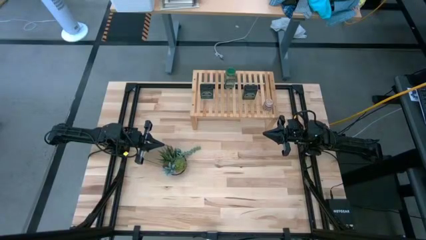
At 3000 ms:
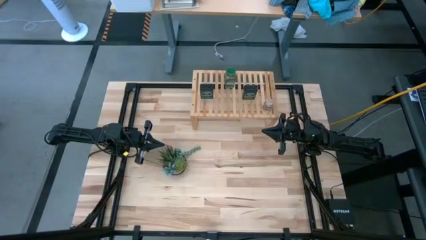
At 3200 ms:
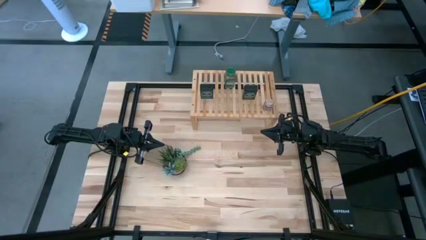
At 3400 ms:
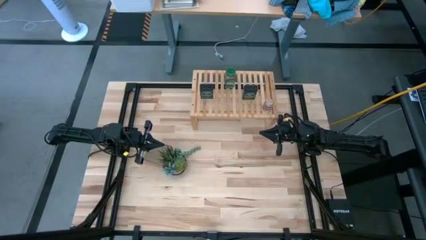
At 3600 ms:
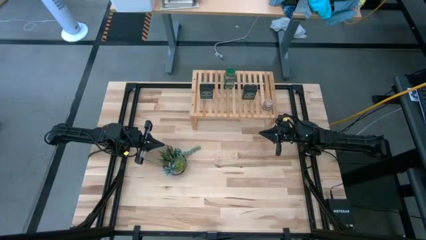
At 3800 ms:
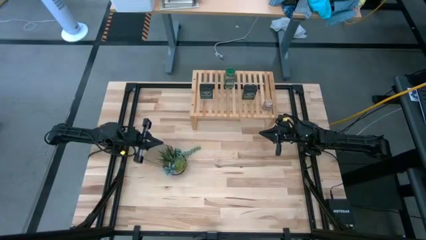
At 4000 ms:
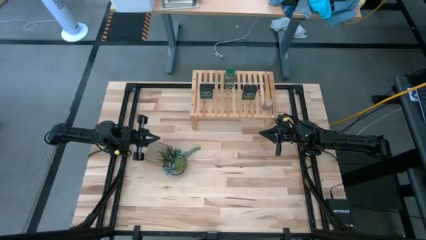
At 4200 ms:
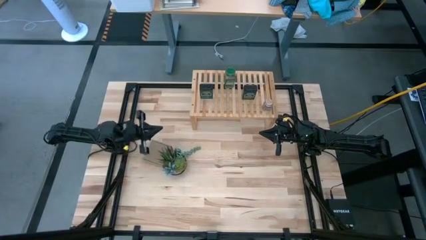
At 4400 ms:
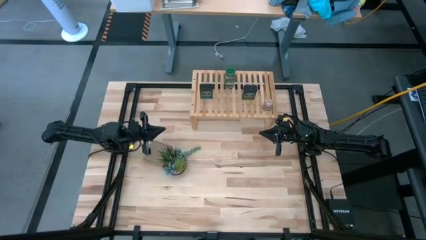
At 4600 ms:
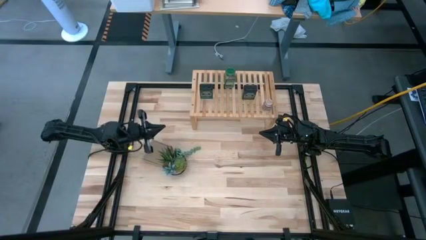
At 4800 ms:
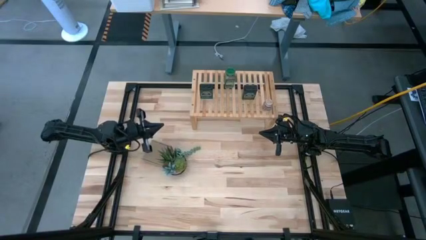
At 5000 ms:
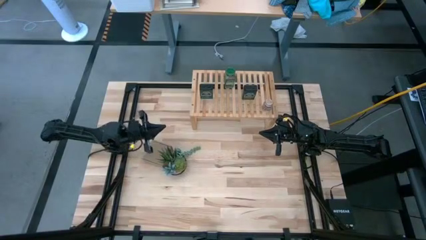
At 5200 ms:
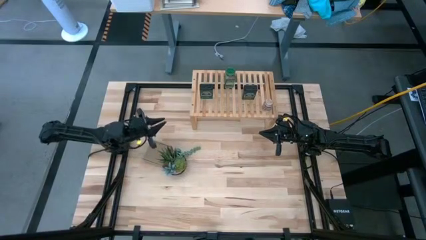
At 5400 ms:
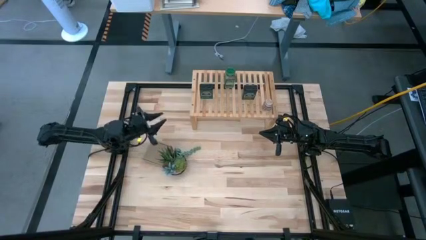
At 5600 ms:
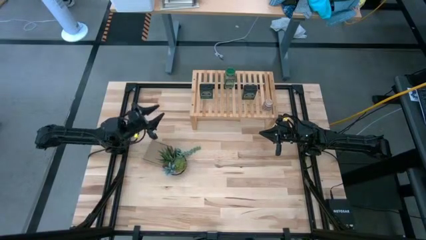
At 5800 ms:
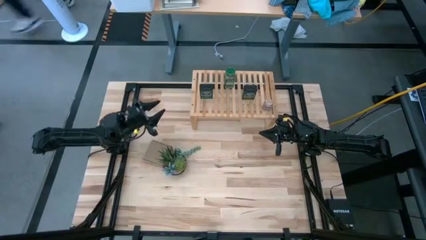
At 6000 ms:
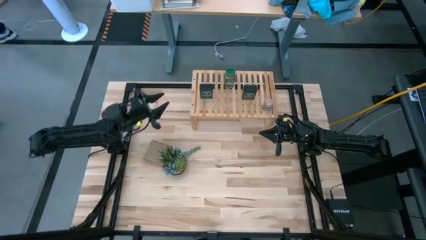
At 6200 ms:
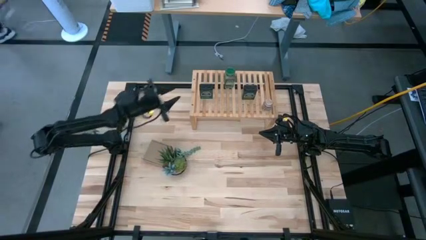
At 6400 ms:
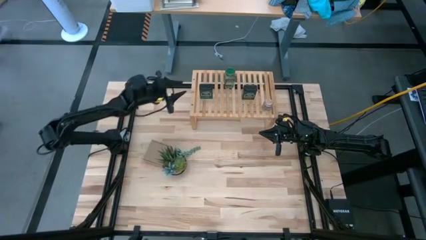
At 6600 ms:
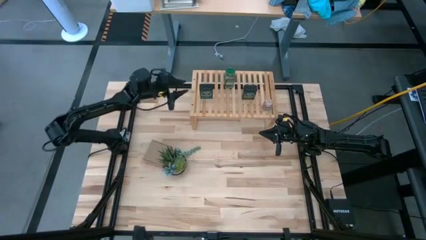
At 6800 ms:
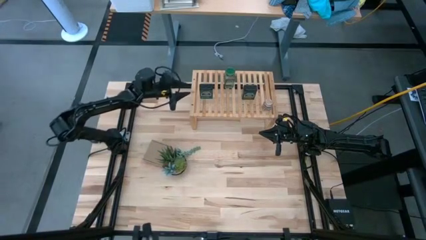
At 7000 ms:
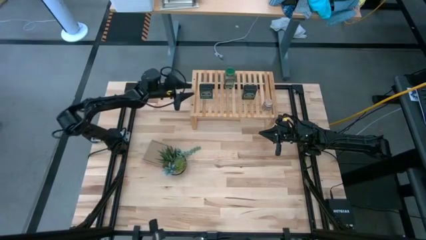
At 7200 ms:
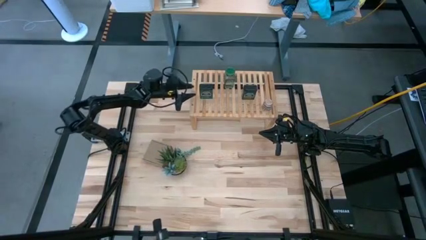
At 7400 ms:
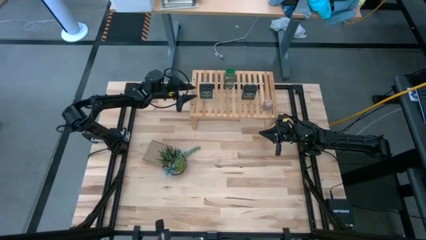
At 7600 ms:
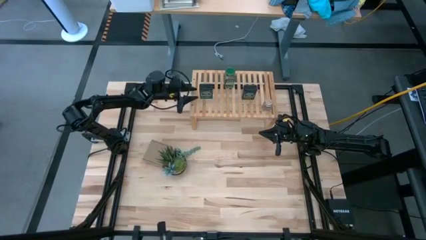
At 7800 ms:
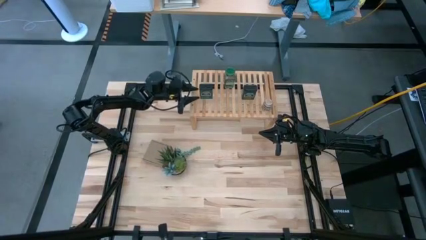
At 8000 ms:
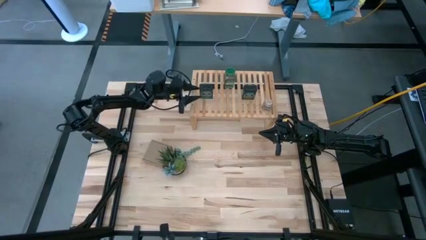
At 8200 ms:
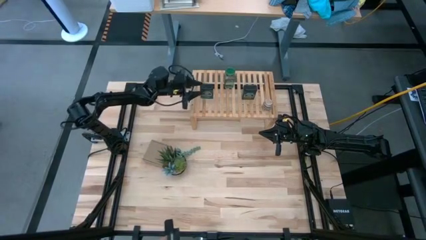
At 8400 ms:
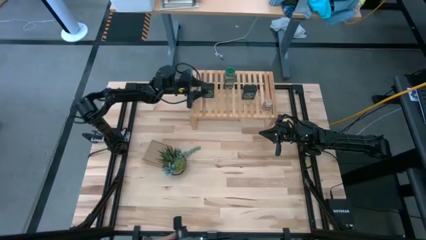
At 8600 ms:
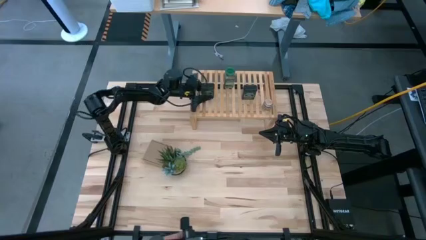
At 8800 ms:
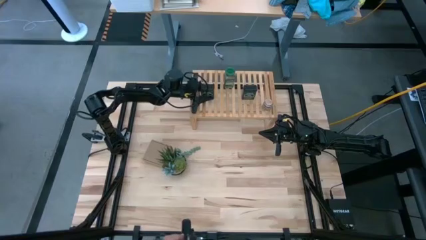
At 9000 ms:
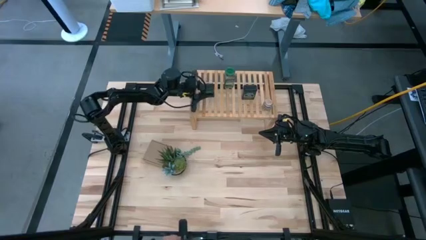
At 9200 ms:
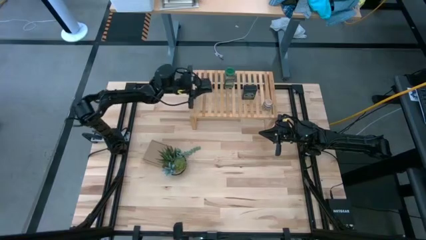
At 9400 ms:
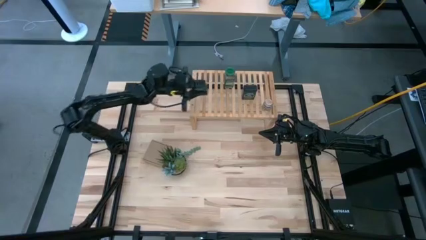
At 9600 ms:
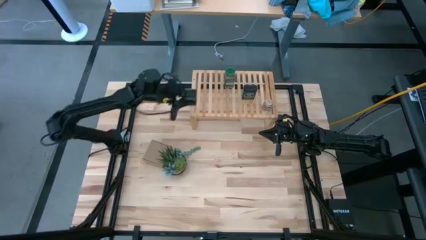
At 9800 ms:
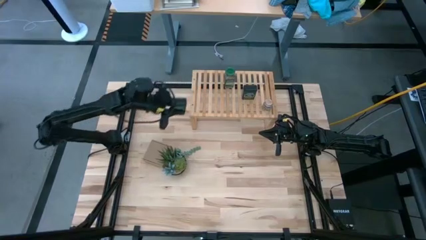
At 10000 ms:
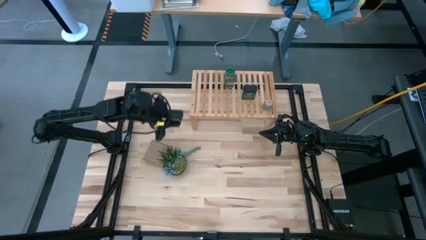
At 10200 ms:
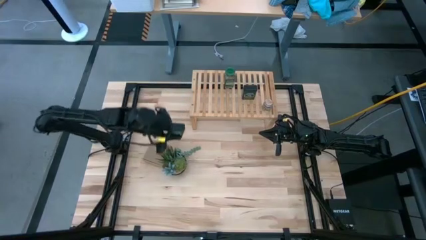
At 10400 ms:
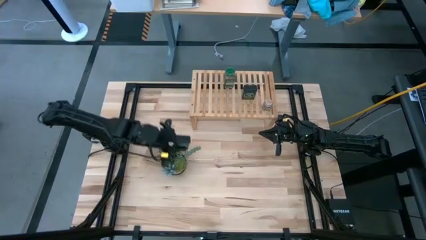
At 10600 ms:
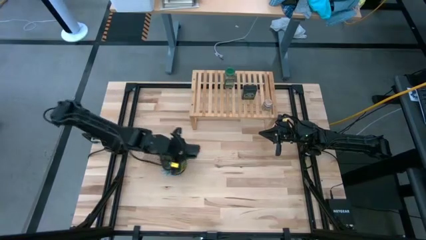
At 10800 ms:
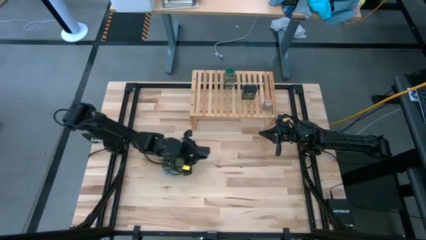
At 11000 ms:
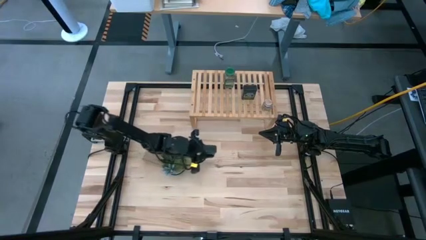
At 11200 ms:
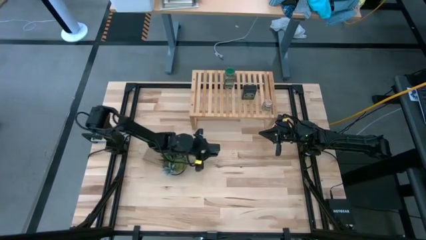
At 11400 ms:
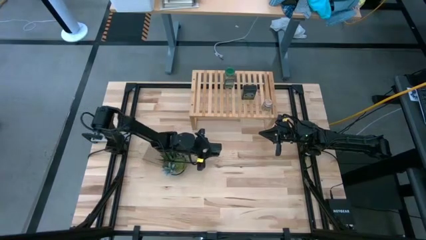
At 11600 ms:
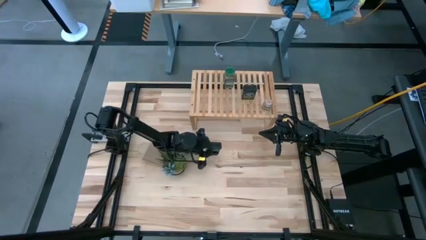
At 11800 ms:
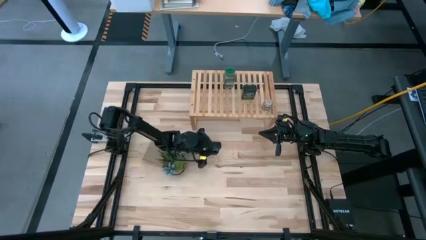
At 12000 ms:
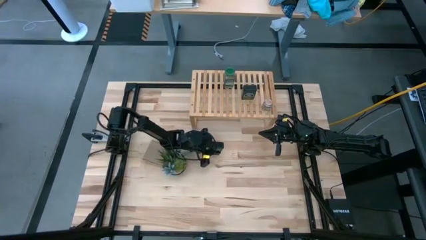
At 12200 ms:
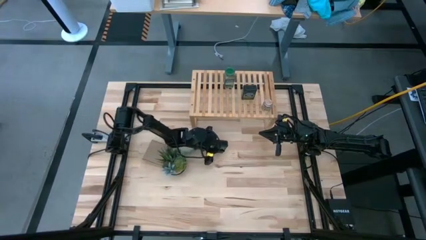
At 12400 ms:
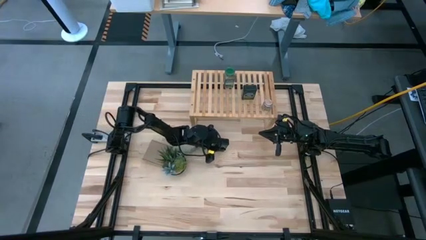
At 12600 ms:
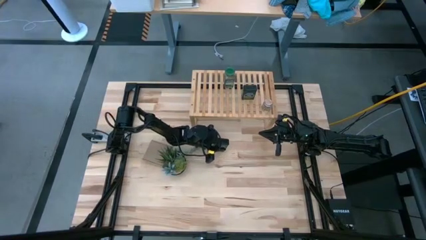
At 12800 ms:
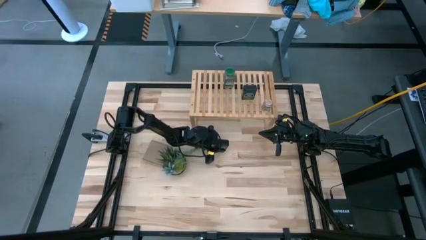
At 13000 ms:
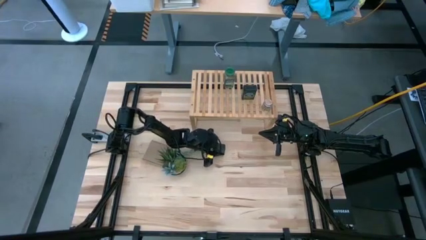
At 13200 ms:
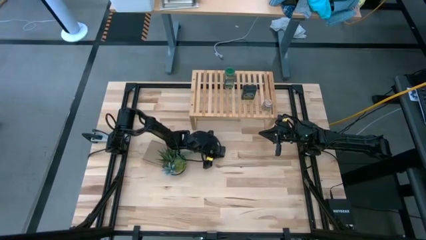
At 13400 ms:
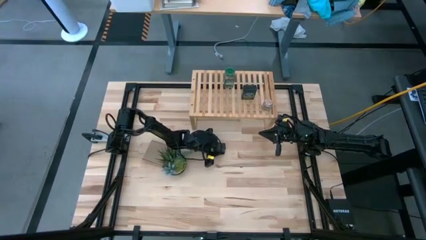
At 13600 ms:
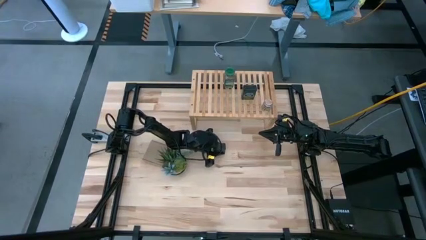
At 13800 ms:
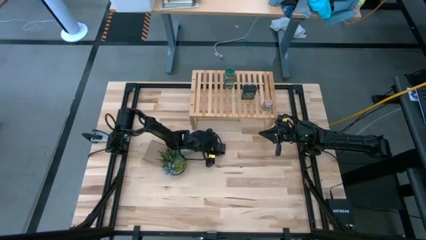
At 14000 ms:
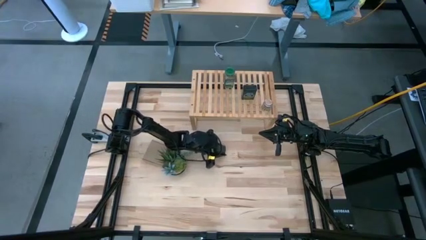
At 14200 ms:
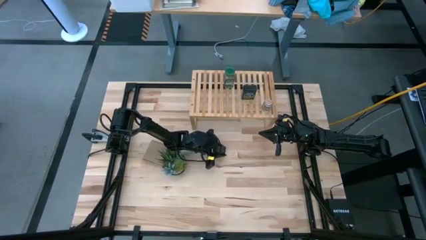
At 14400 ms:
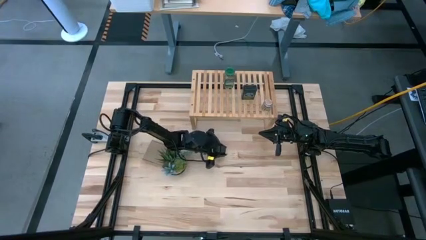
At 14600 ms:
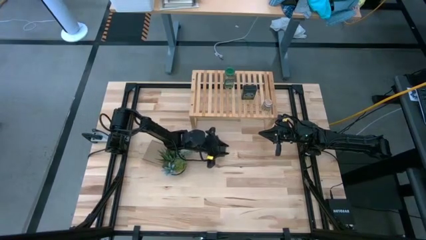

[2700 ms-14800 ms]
Task: Shelf spices
Remove the green seasoning can from the shelf
